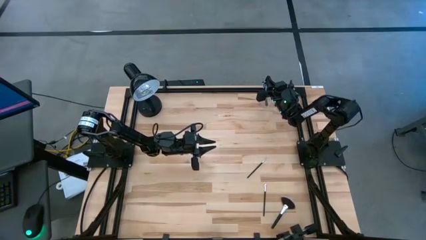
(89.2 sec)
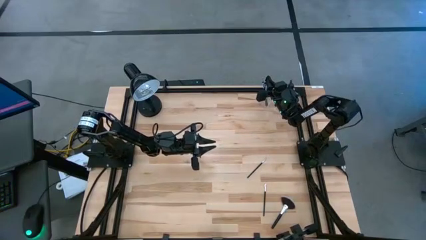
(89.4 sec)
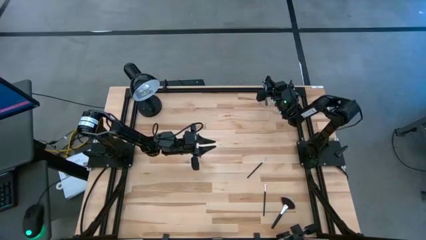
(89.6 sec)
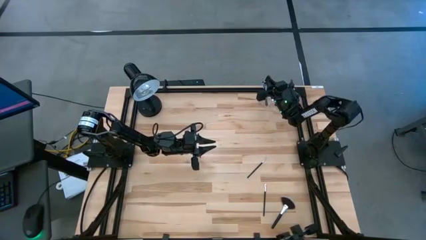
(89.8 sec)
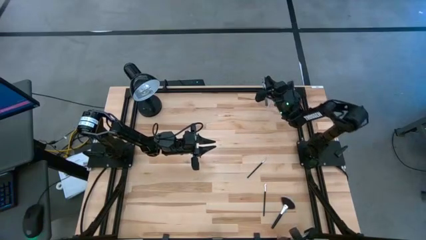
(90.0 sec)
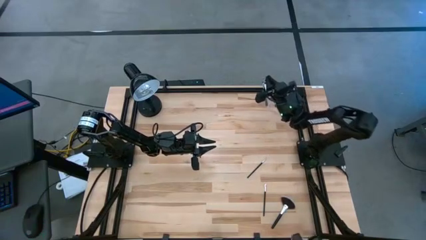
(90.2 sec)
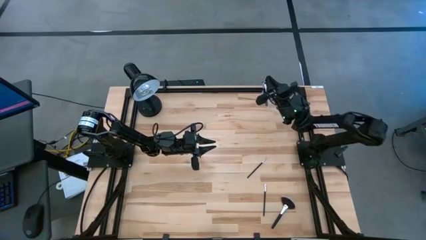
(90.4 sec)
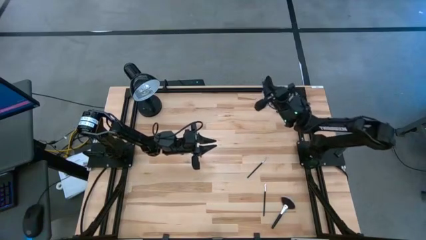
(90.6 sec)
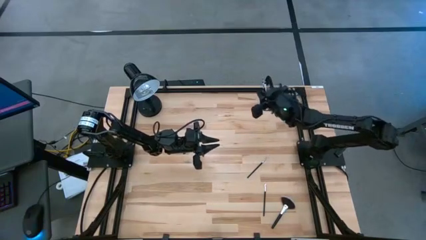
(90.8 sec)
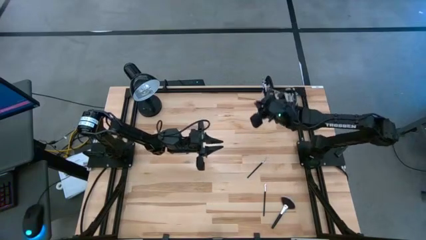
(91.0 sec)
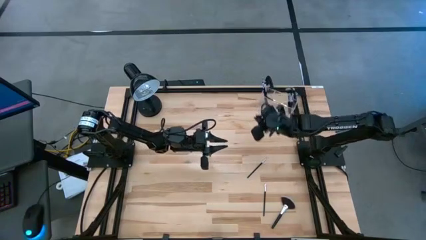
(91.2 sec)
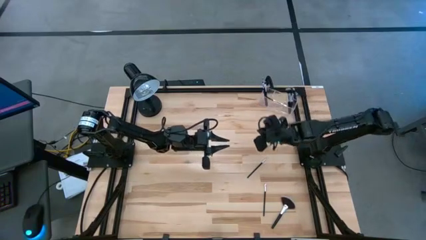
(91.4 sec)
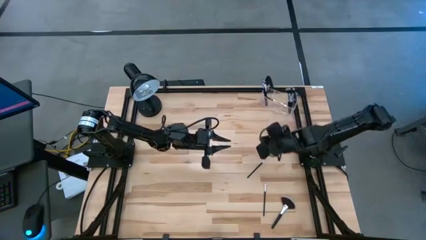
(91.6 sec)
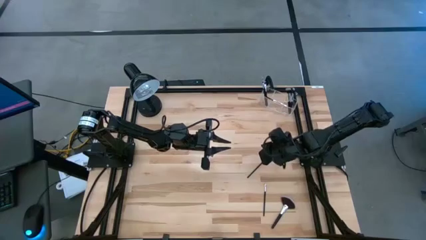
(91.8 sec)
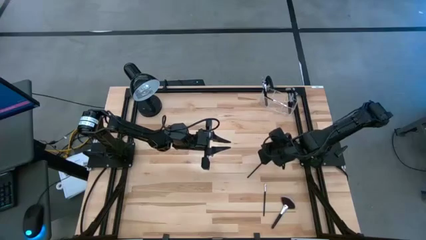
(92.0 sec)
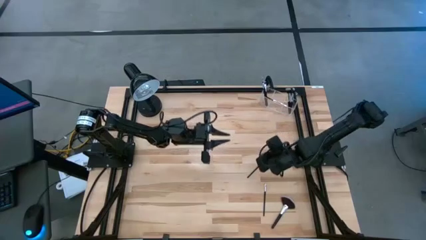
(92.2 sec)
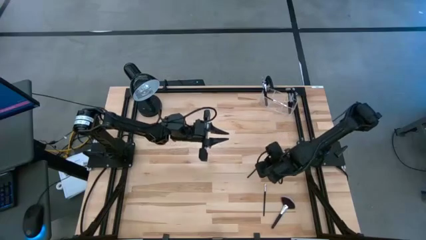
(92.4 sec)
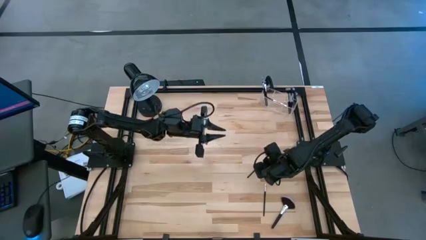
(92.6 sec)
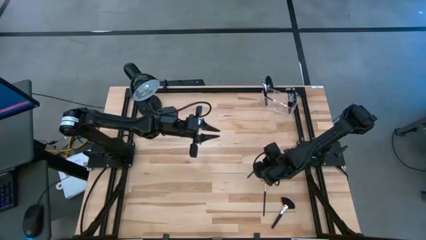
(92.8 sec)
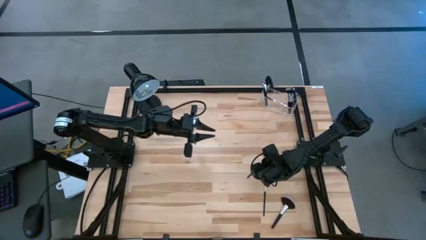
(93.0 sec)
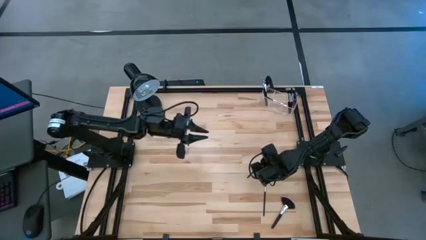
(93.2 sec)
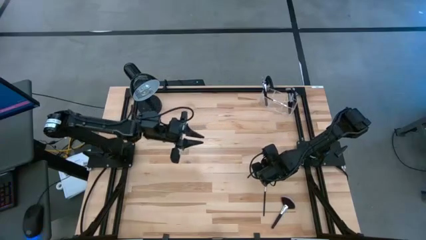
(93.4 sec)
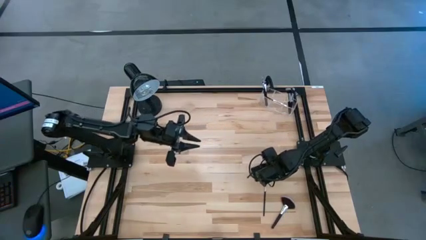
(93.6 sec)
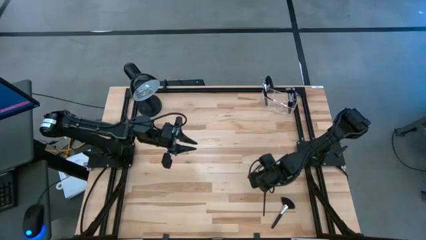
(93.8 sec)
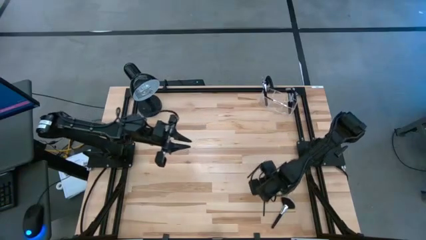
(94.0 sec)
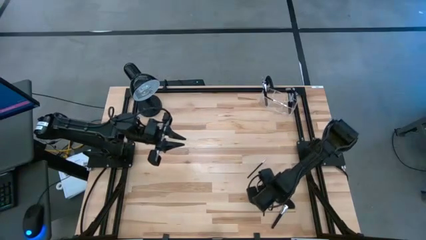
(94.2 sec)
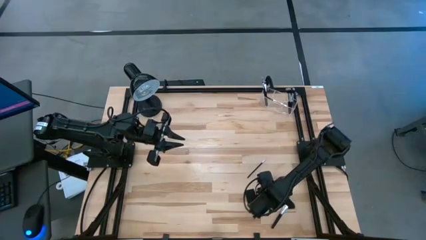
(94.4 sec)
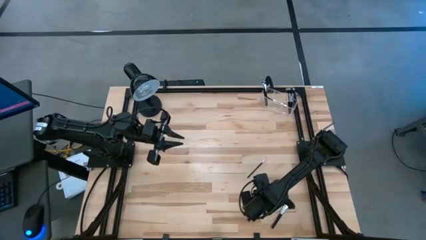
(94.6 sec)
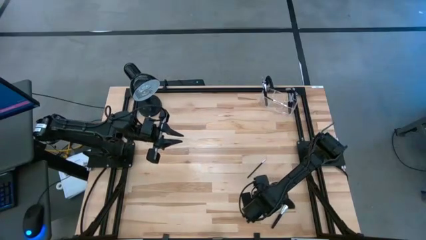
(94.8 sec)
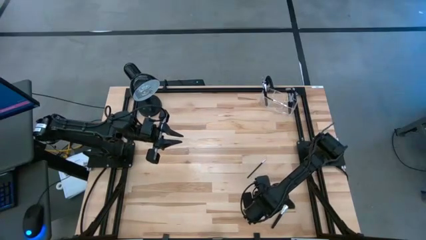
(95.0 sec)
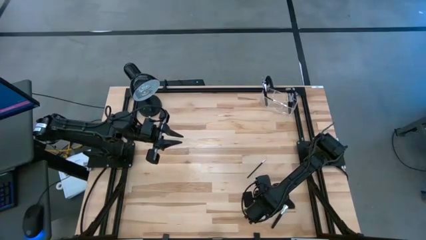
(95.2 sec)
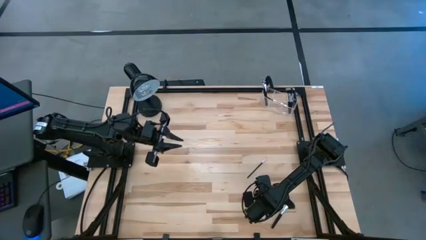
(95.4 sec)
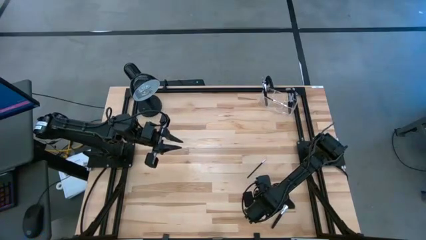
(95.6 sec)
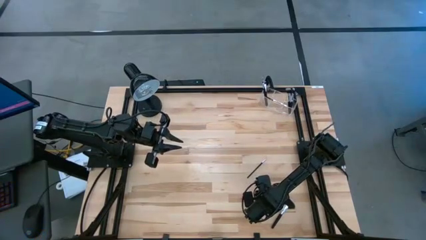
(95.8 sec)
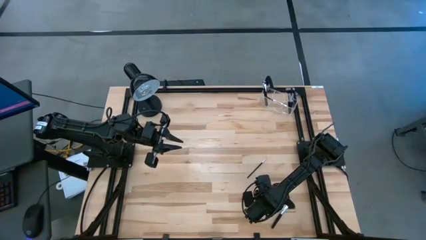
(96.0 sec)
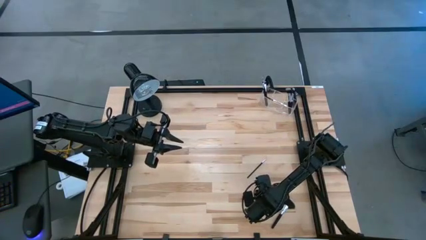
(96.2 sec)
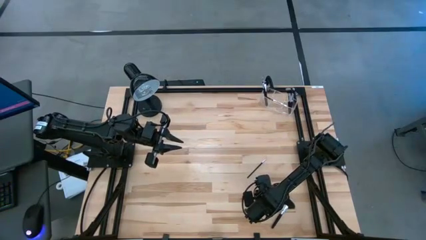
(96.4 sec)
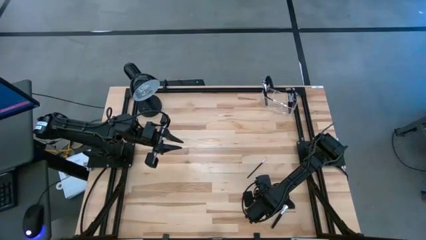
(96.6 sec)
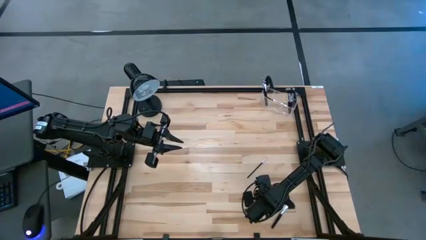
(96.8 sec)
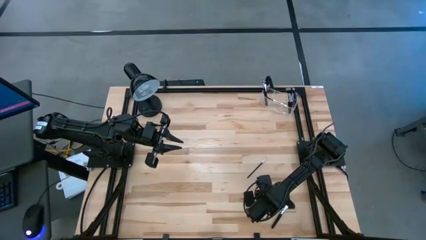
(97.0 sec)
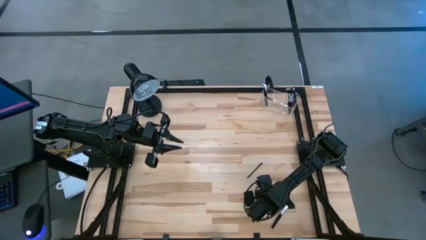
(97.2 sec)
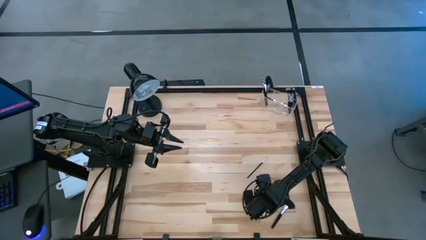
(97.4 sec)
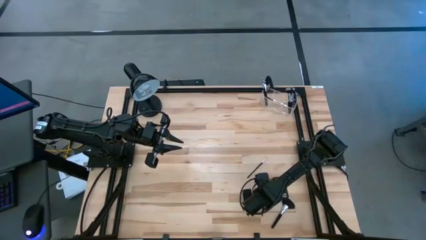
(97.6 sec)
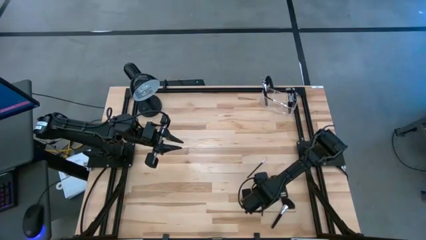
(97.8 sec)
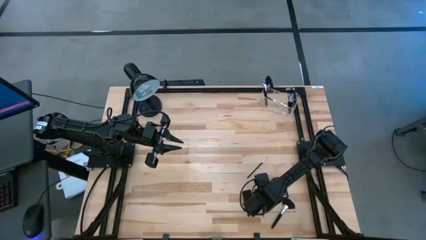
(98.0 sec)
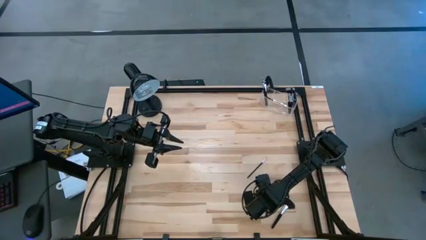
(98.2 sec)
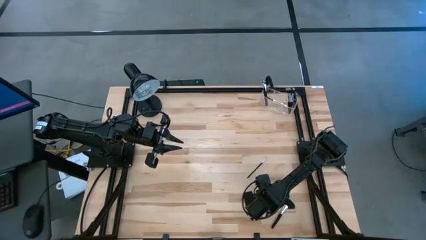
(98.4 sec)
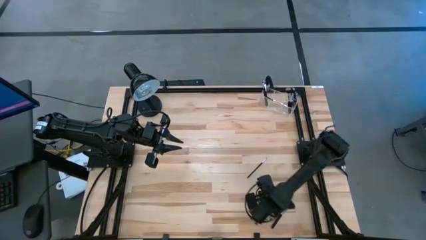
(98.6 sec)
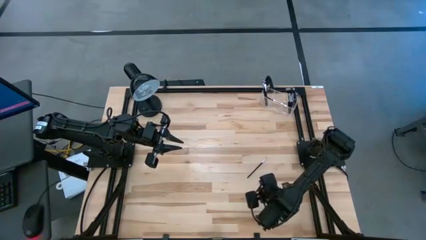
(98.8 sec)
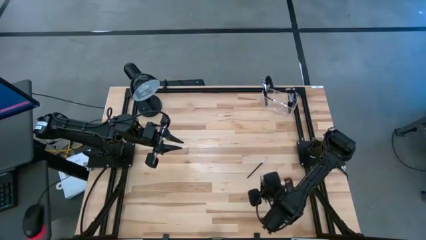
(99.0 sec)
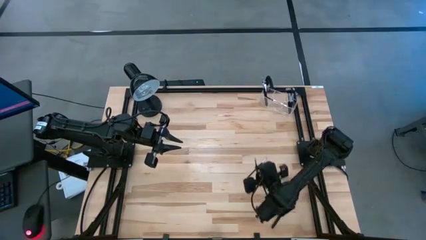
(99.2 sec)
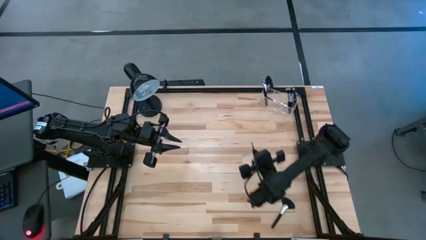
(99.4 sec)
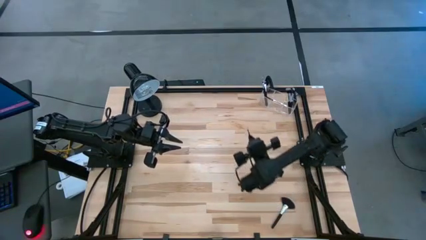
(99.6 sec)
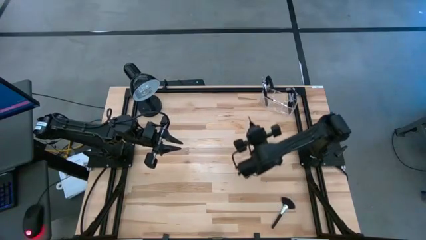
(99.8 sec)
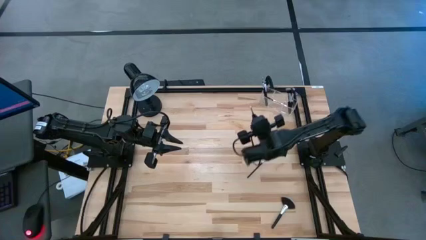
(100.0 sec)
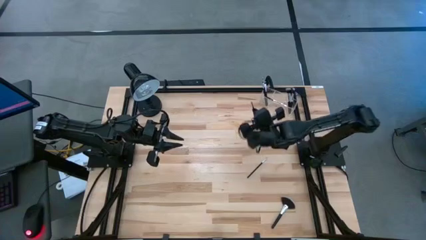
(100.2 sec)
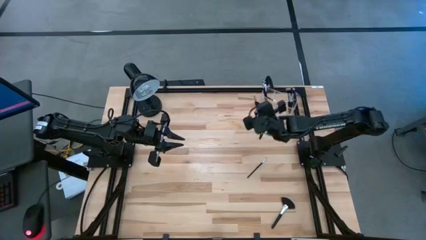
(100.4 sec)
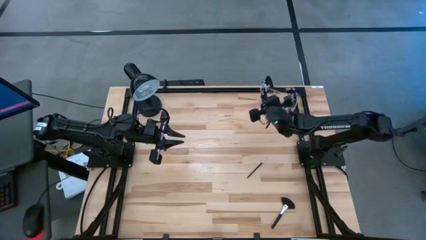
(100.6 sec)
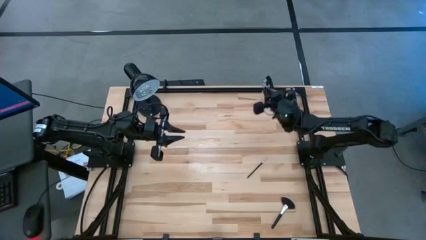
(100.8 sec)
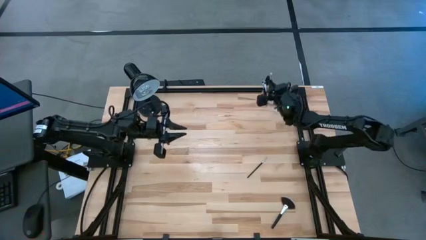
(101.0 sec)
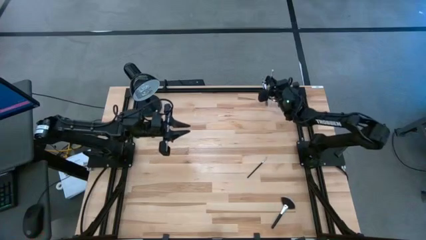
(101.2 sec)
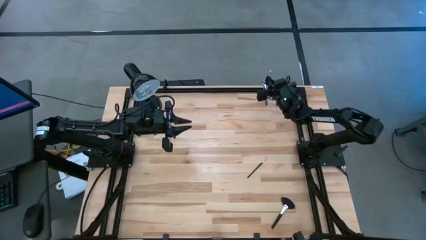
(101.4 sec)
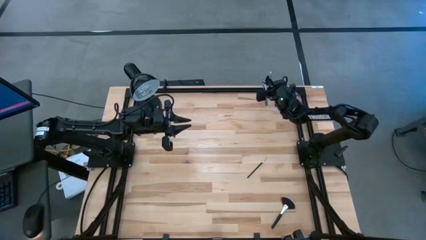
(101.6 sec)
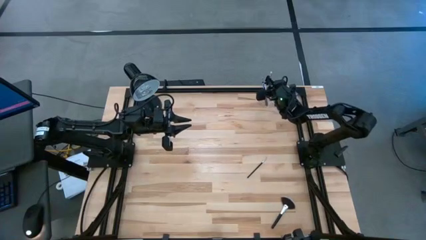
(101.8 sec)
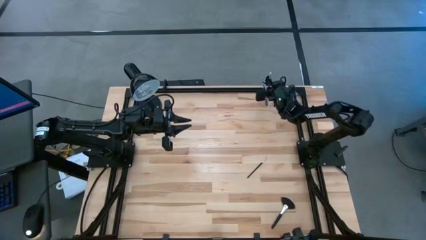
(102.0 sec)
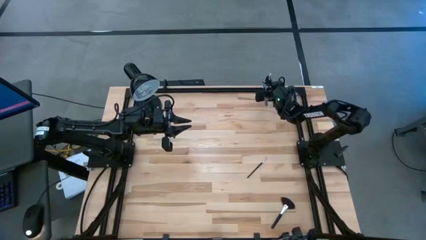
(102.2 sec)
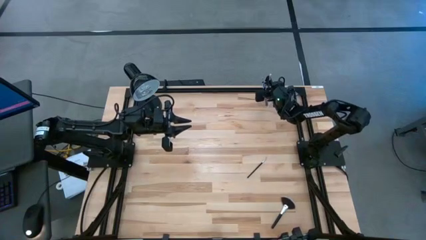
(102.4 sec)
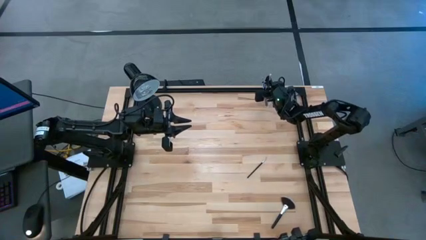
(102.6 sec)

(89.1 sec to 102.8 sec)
Task: Sort items
Put the eyeshadow brush into the transparent organizer
